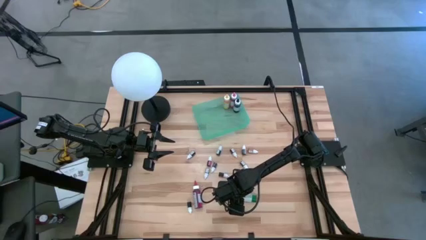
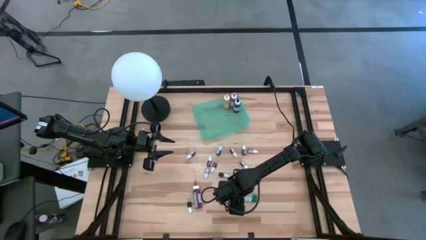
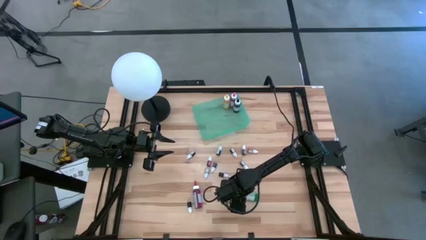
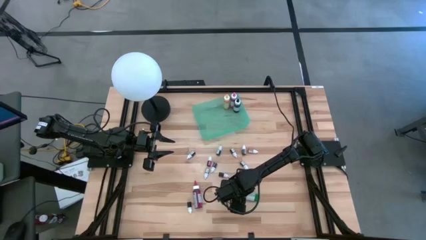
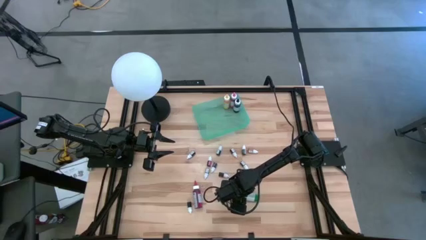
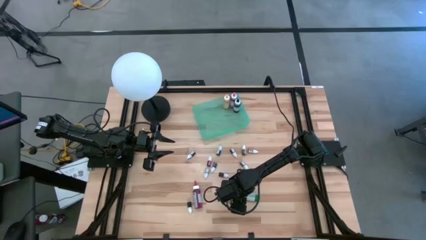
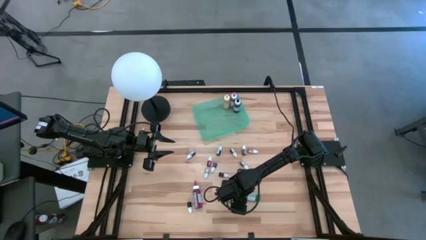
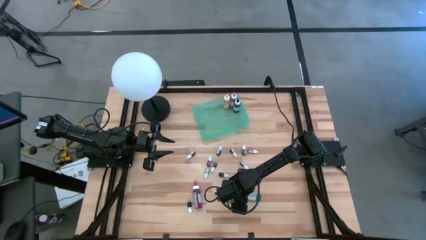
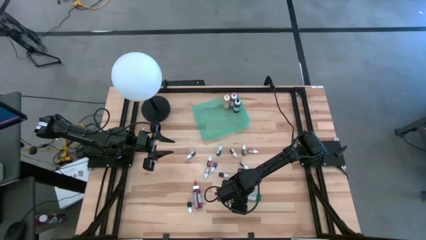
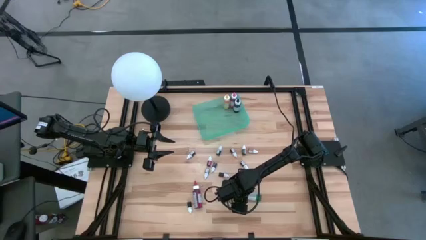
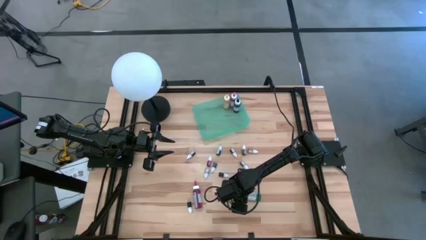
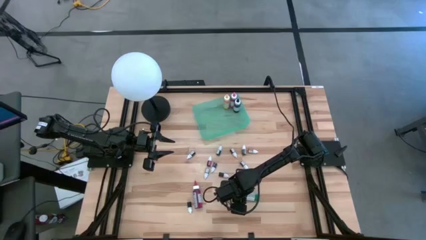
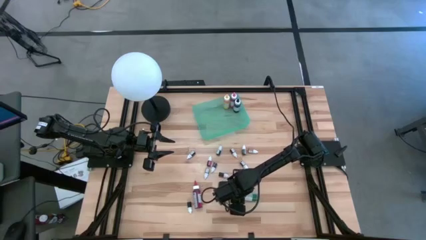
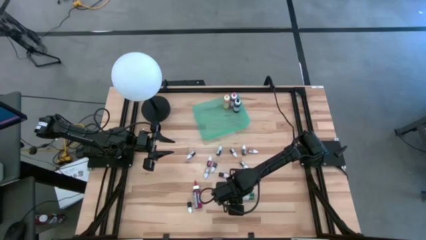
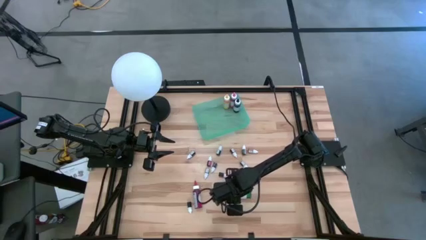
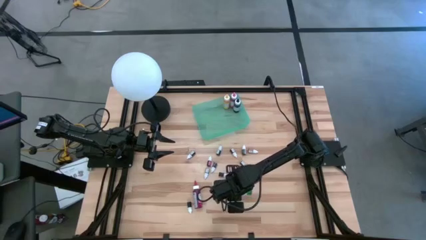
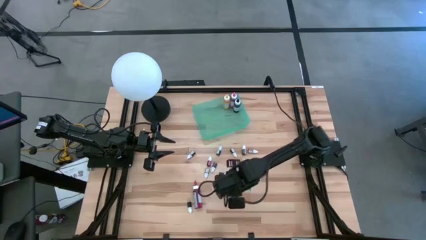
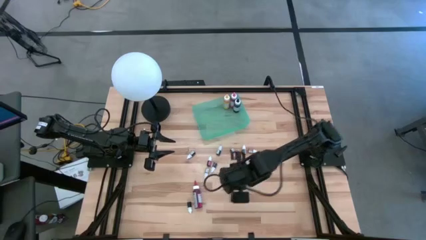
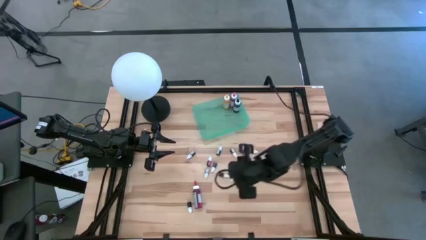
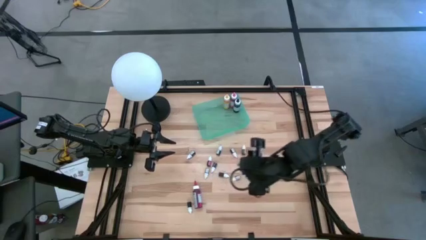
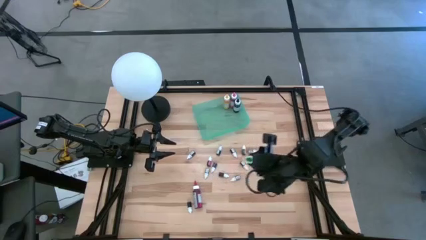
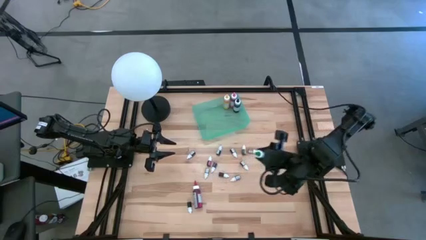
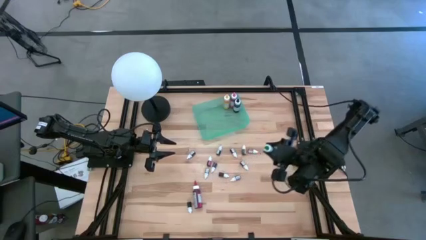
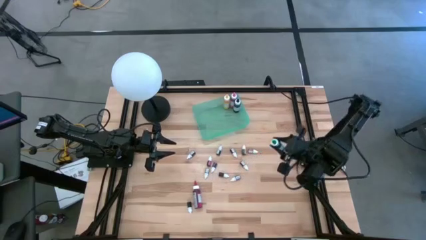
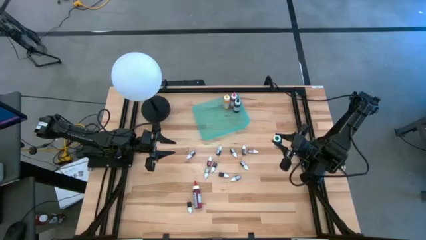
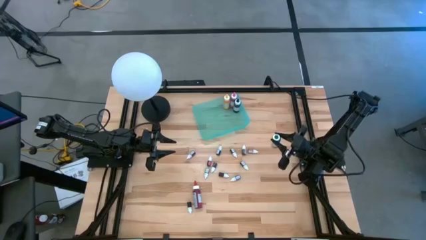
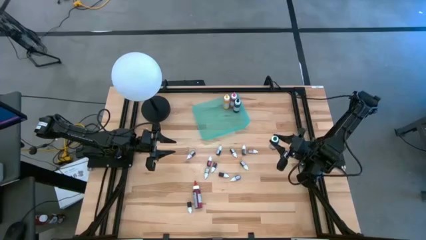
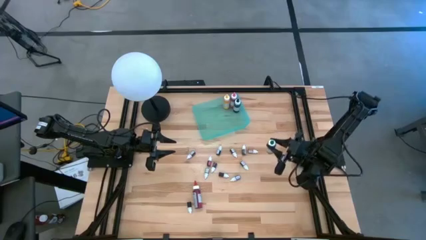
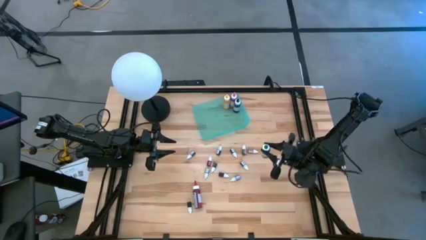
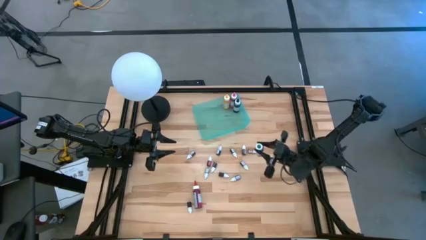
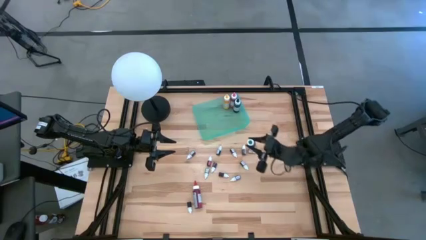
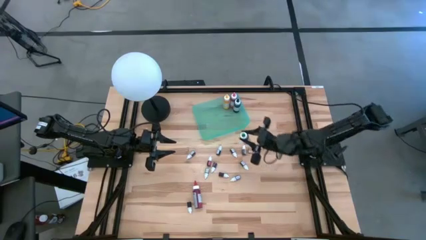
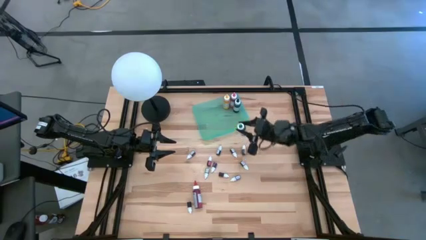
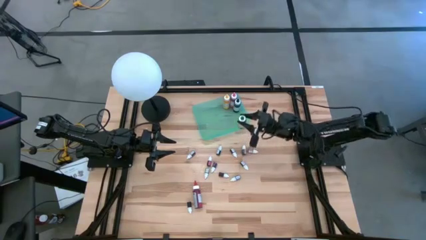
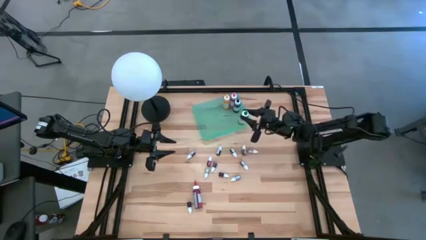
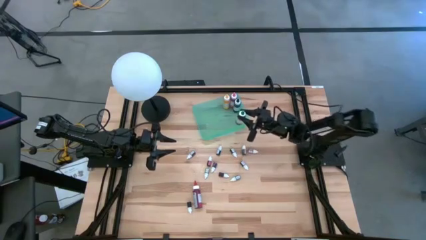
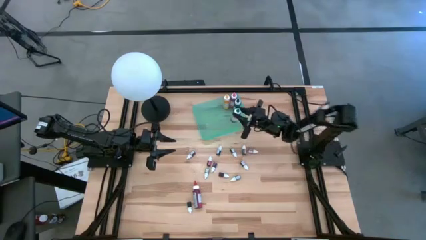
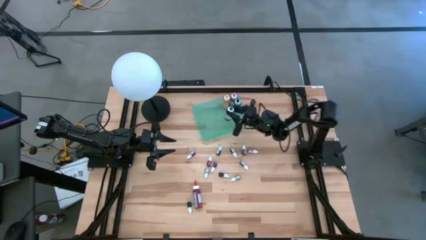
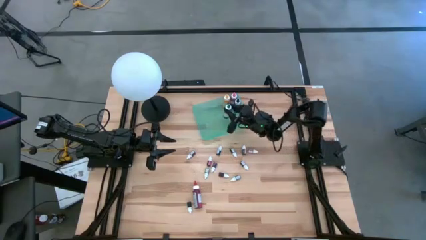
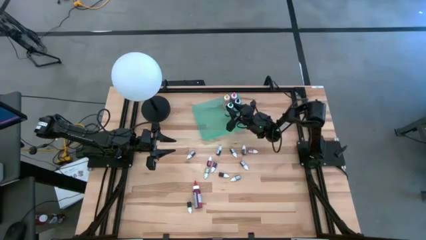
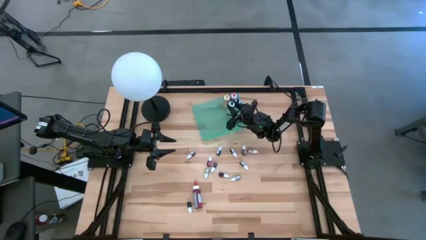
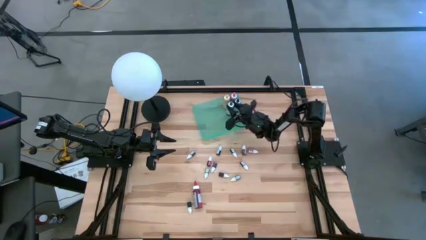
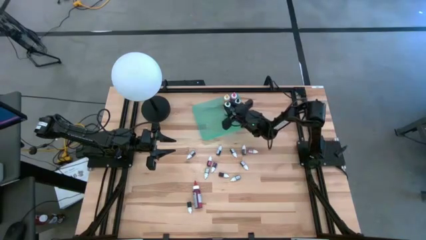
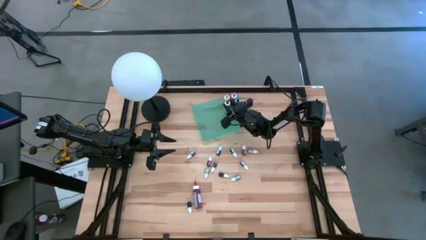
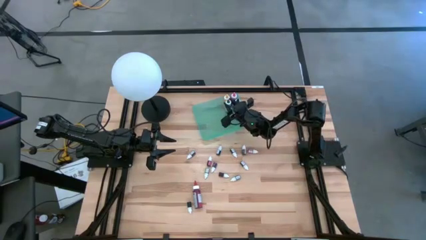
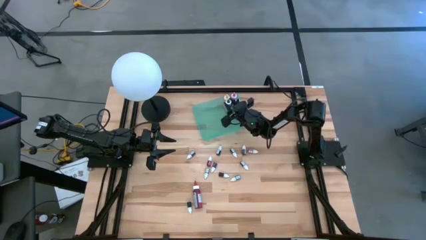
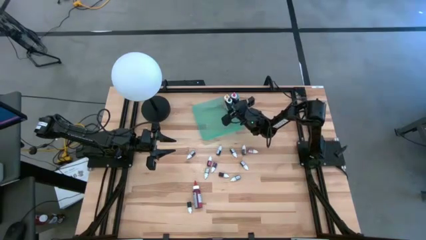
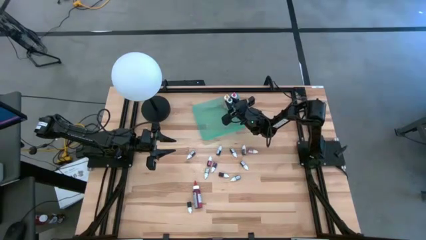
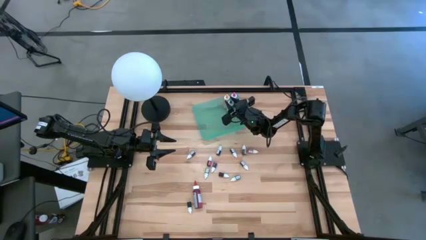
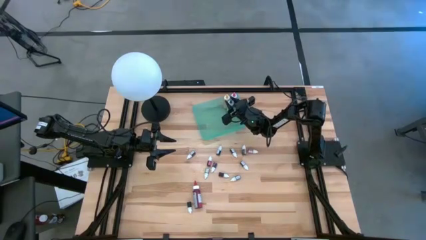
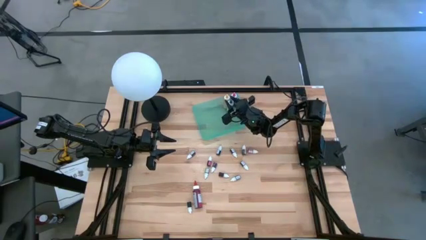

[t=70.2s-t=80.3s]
Task: Pick & Place food coloring
Put the green food coloring bottle into the green bin

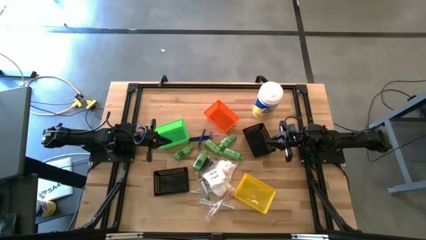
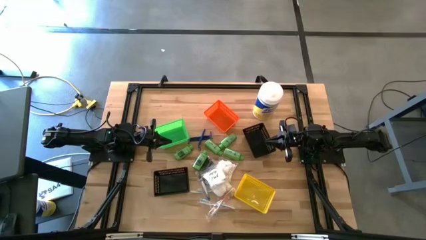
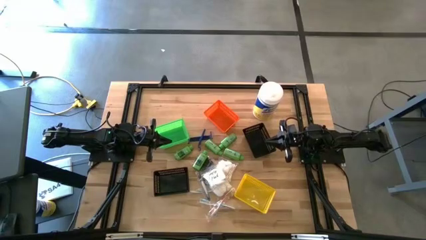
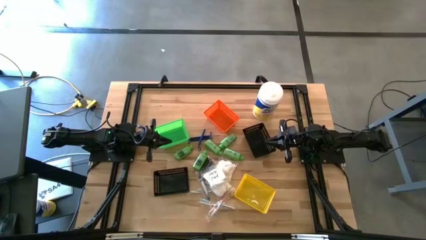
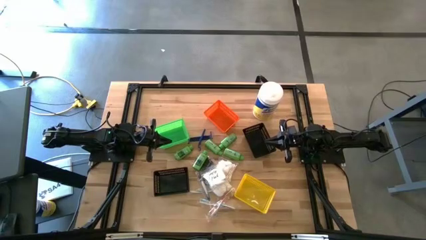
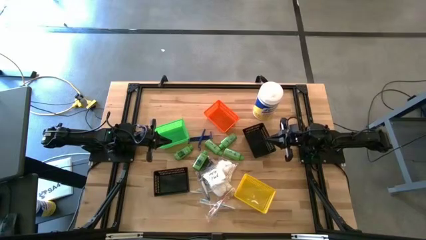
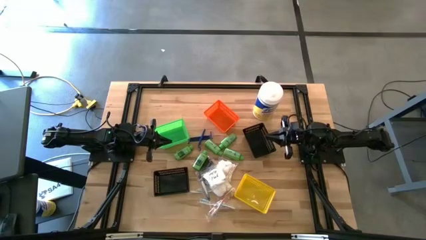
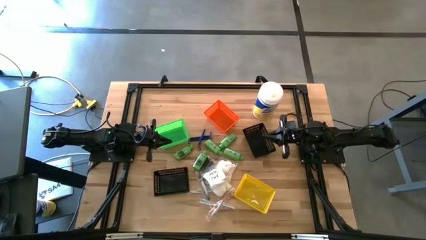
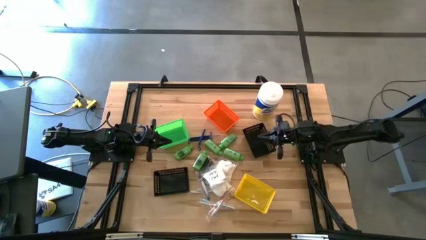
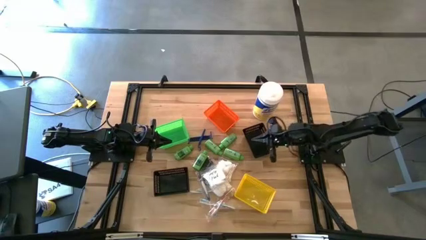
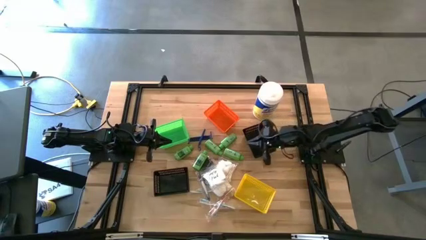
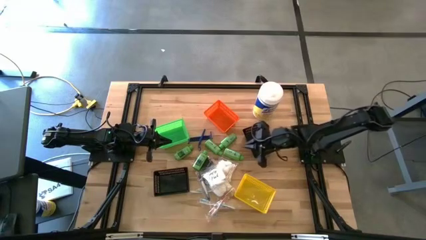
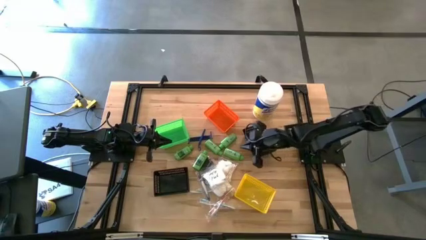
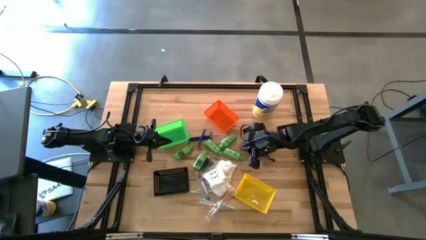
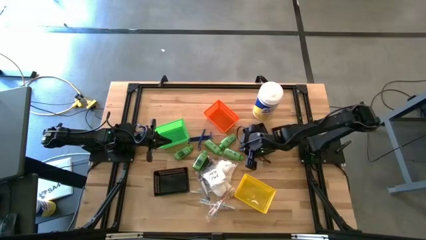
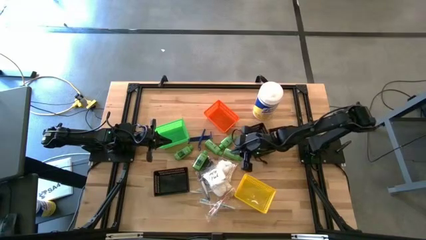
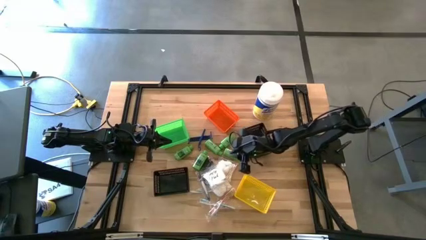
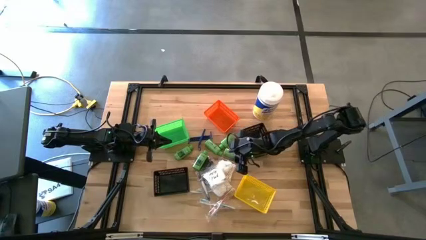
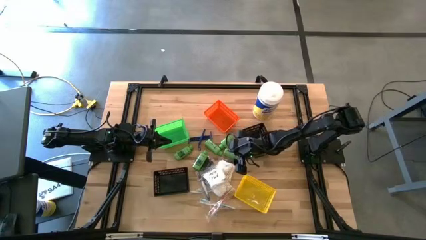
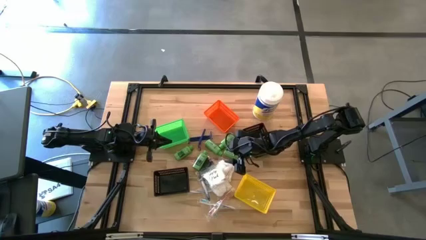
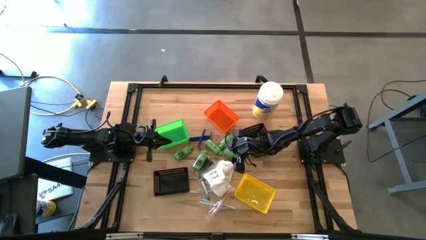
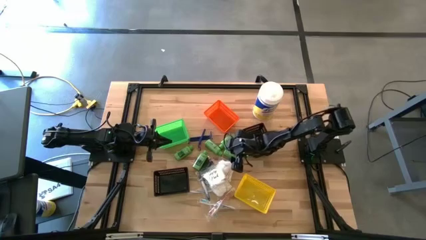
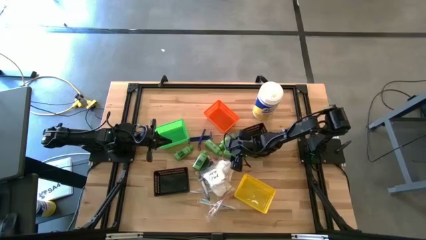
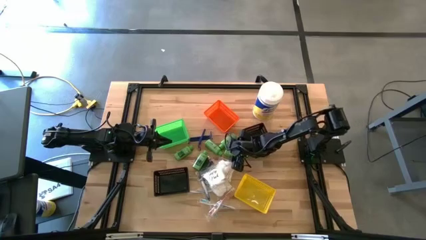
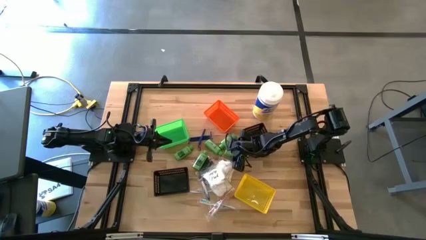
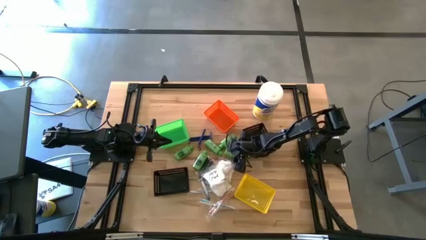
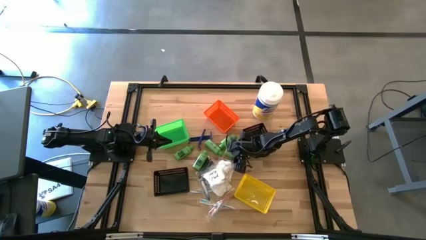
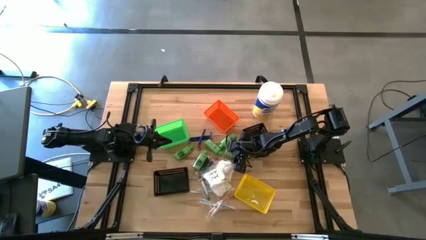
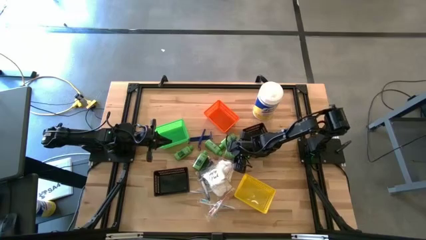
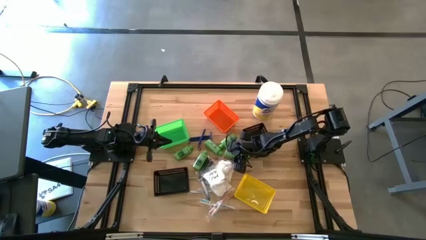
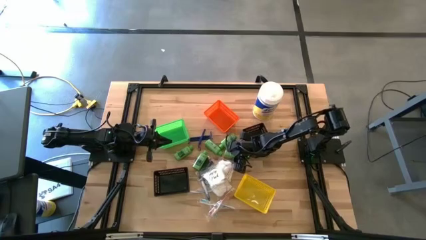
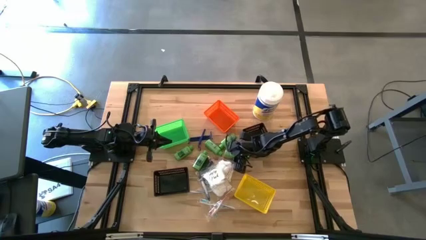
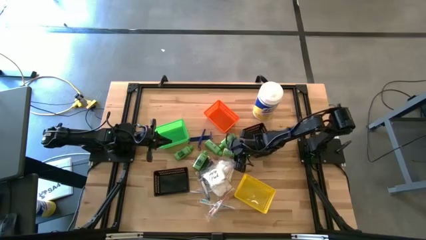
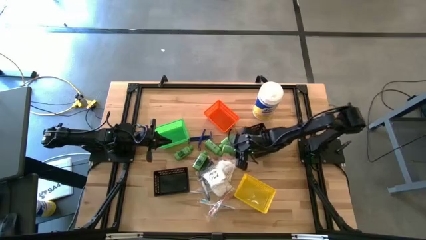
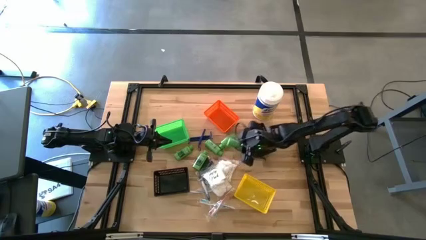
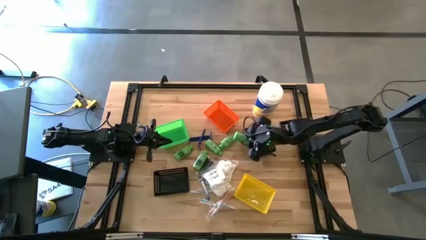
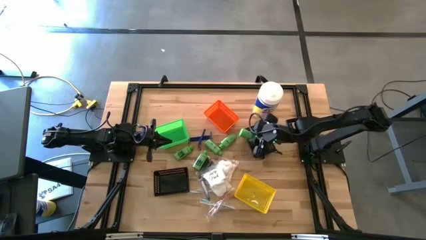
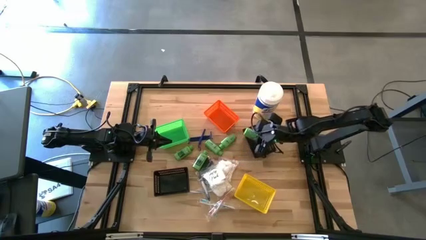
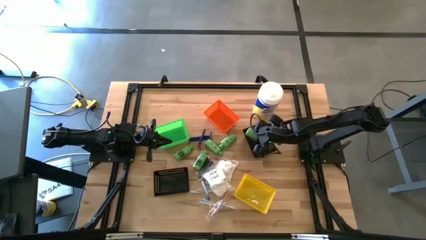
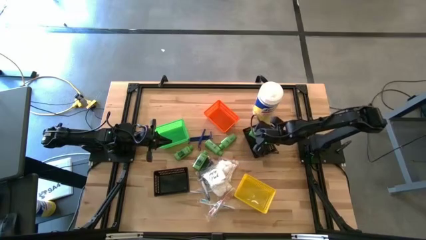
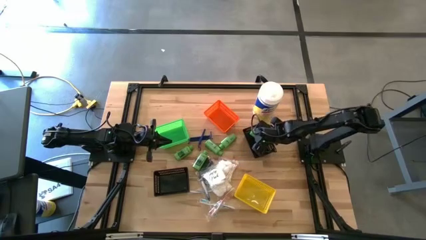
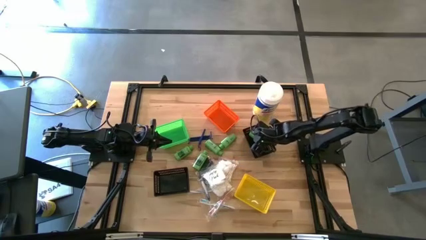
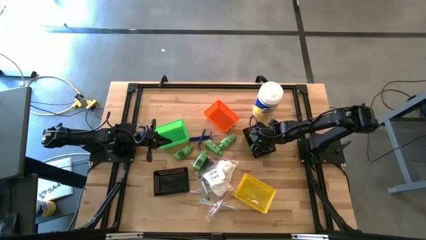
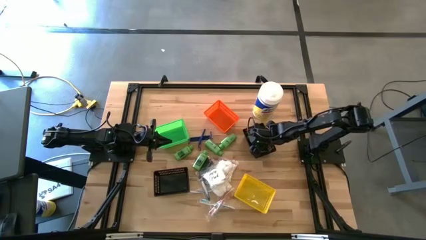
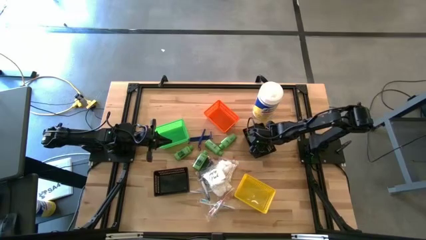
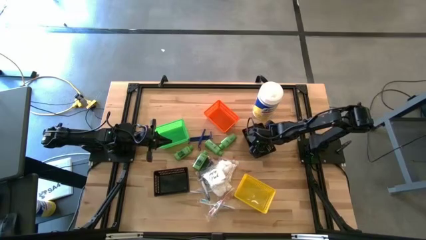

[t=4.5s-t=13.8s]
Task: Pick & Place Travel size toiletries
Put the green shampoo into the top black bin
